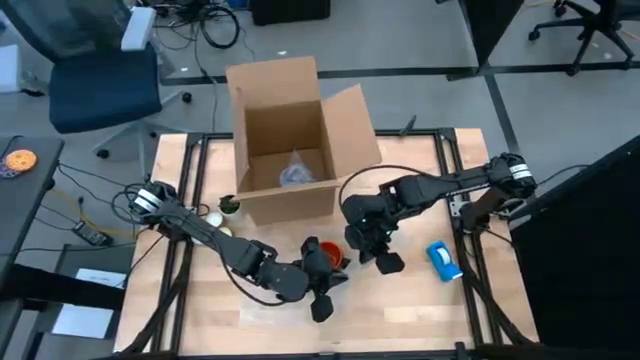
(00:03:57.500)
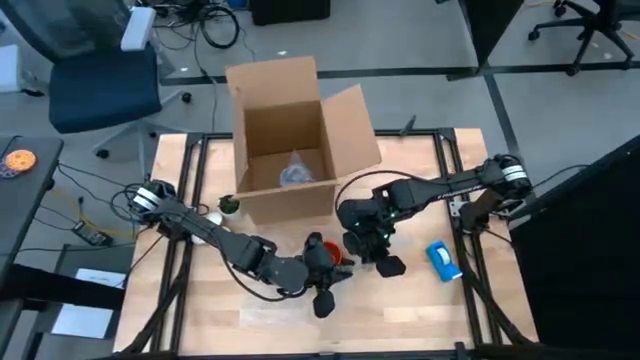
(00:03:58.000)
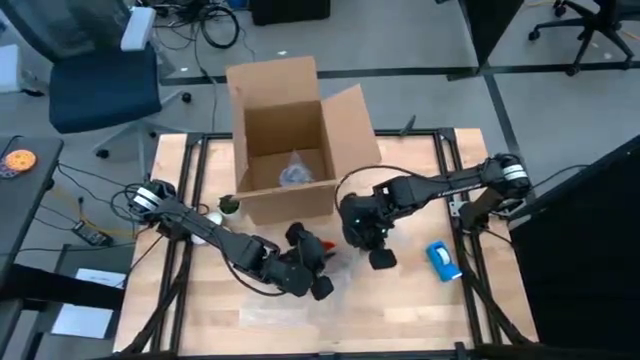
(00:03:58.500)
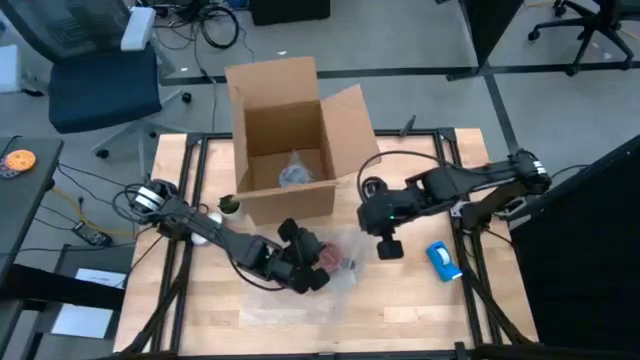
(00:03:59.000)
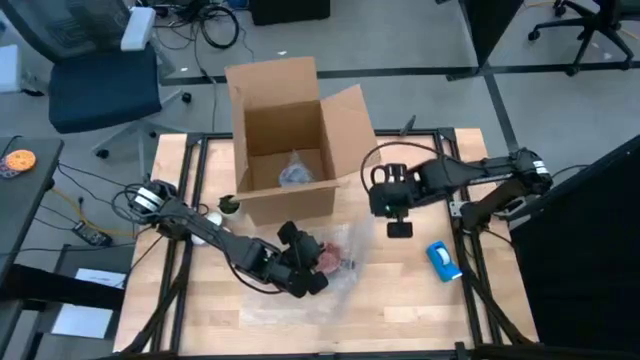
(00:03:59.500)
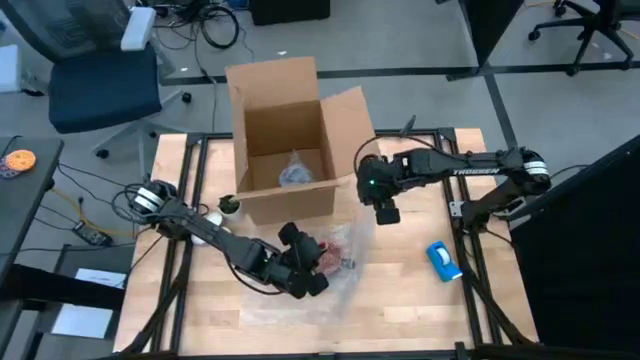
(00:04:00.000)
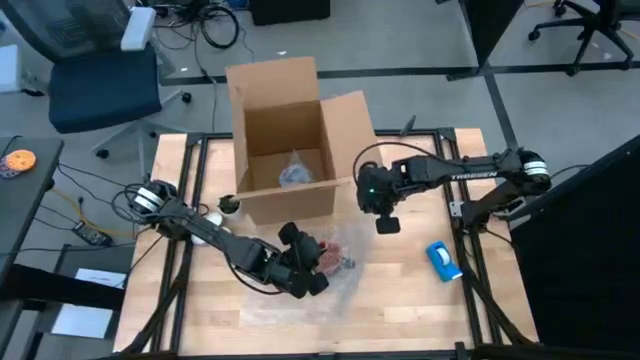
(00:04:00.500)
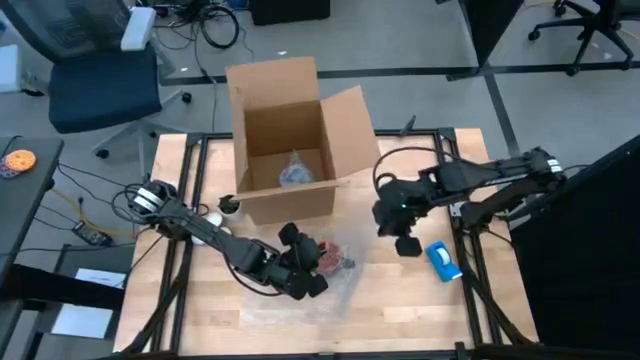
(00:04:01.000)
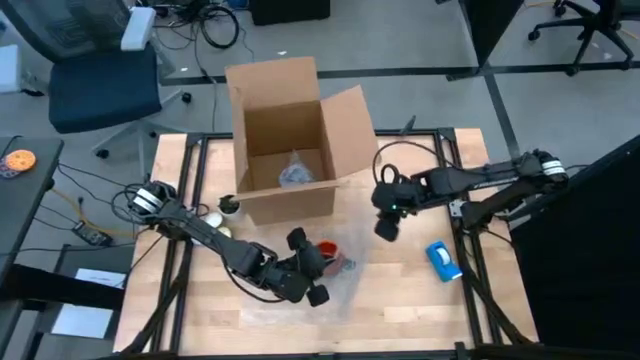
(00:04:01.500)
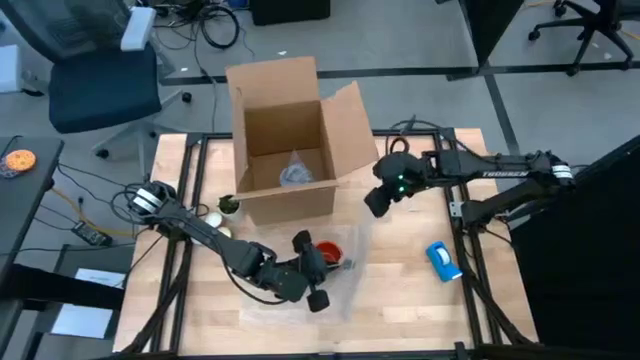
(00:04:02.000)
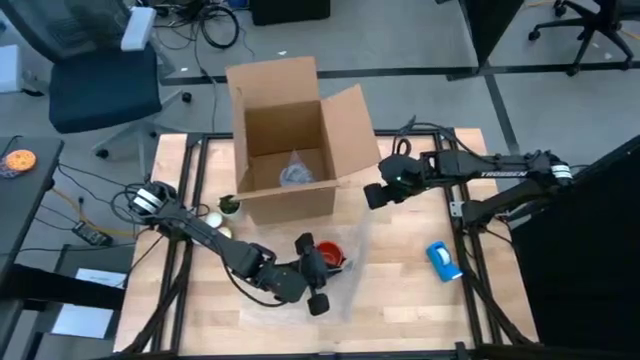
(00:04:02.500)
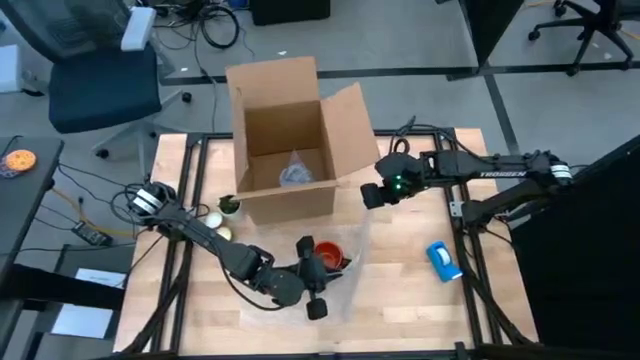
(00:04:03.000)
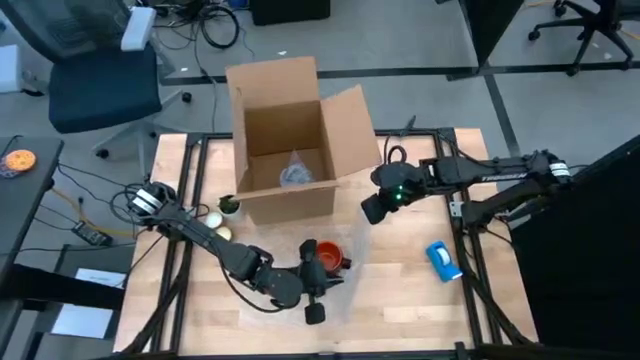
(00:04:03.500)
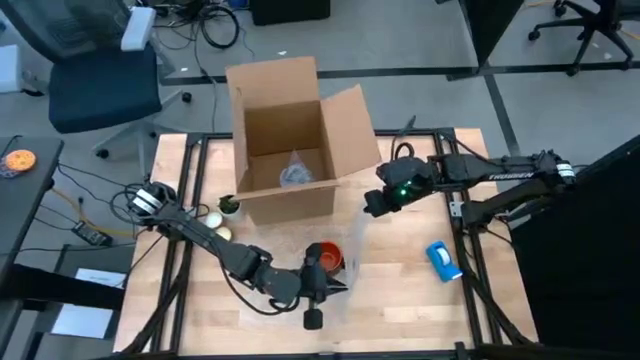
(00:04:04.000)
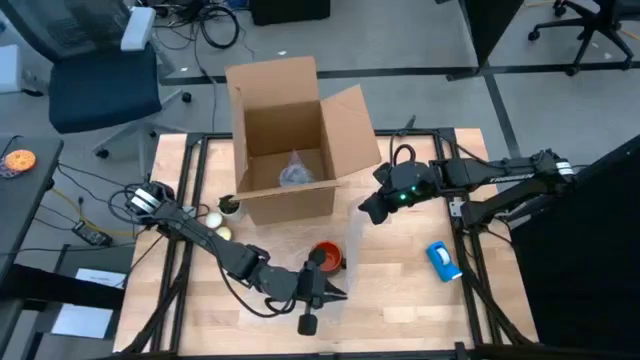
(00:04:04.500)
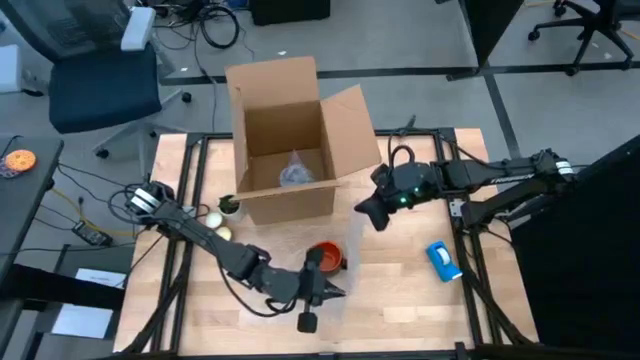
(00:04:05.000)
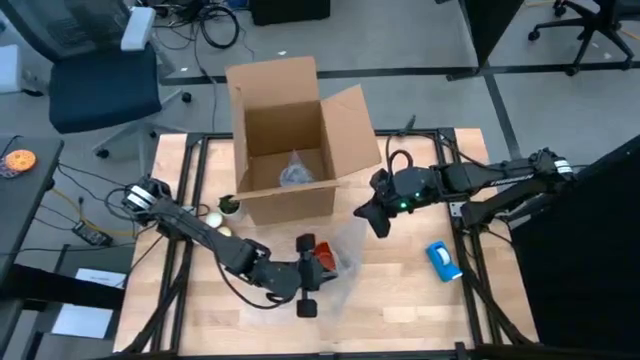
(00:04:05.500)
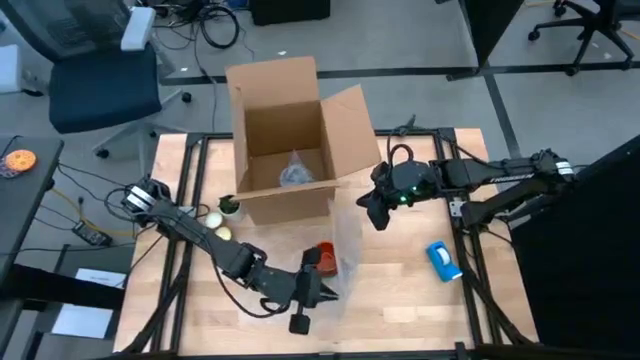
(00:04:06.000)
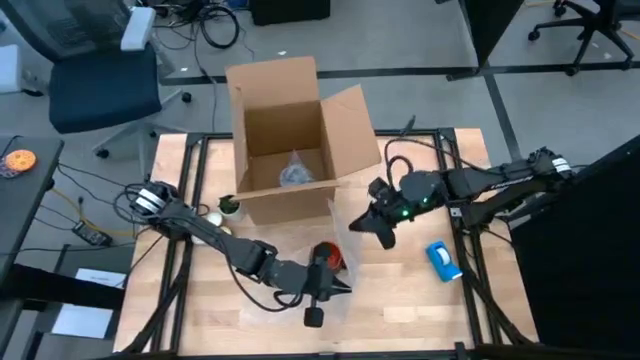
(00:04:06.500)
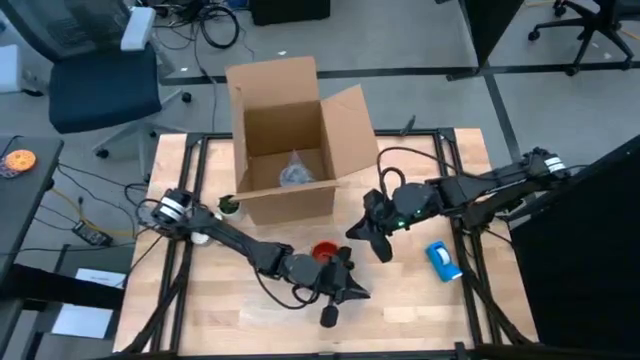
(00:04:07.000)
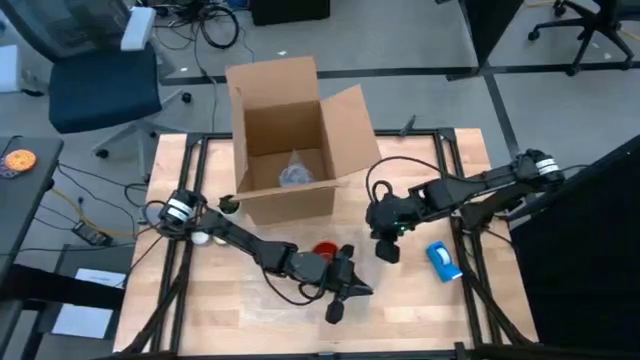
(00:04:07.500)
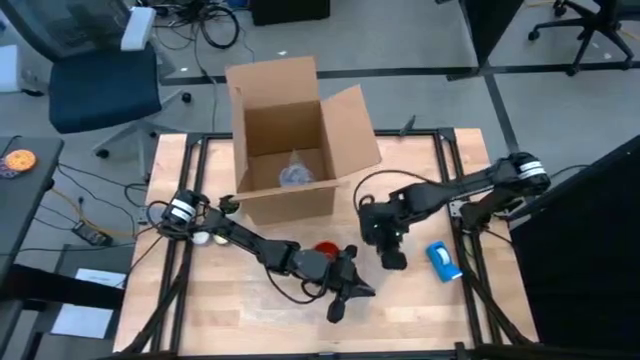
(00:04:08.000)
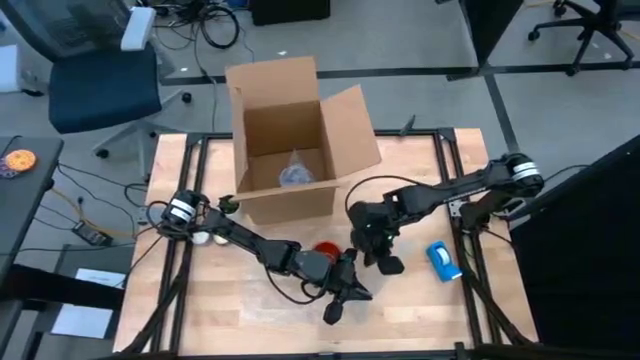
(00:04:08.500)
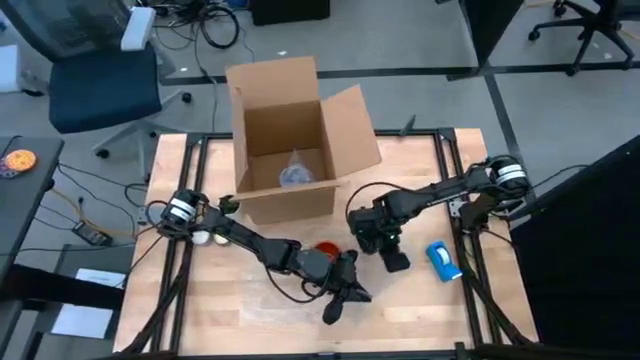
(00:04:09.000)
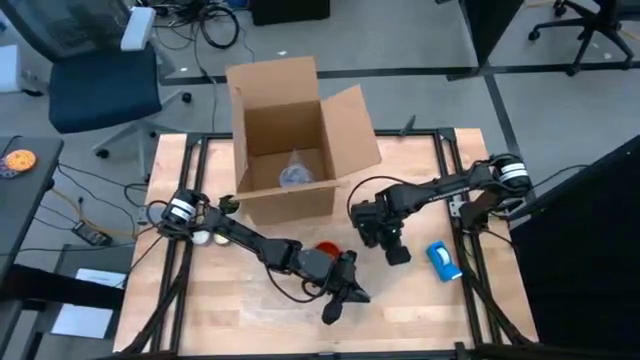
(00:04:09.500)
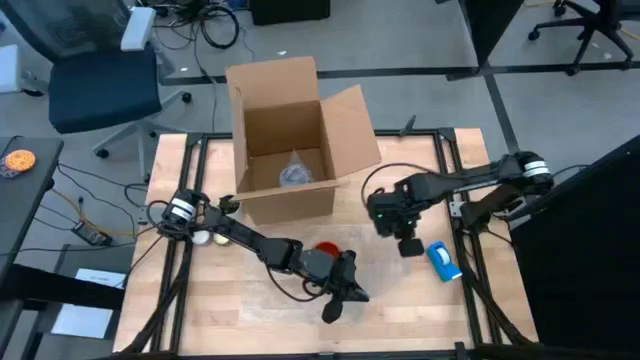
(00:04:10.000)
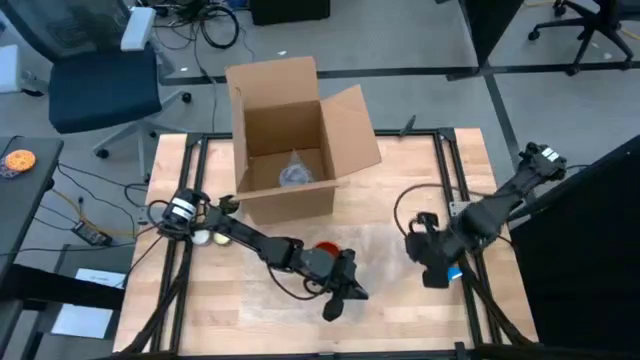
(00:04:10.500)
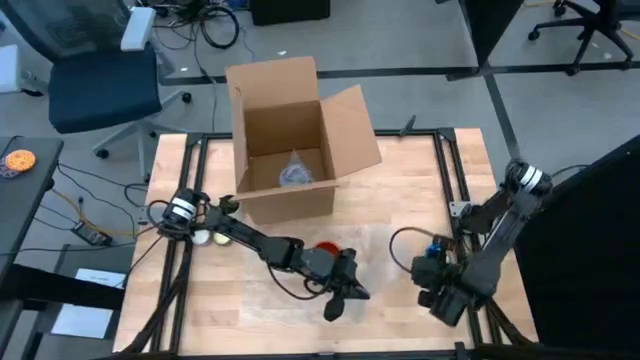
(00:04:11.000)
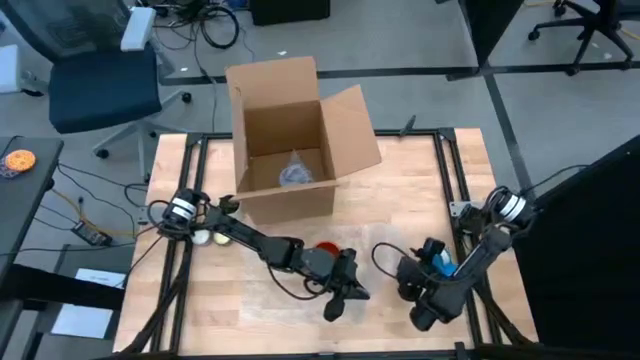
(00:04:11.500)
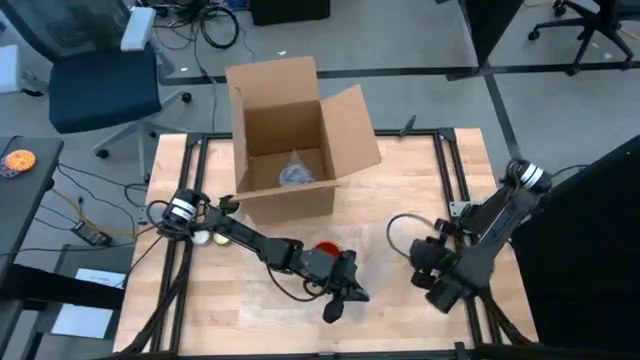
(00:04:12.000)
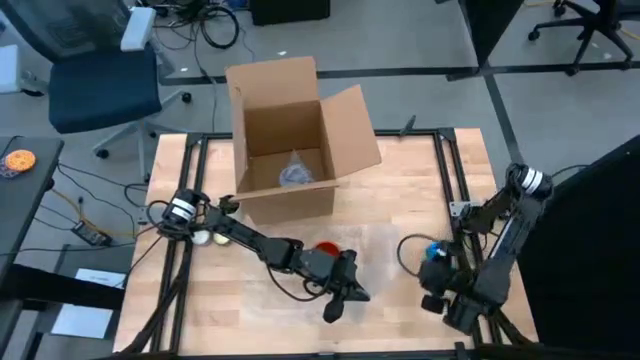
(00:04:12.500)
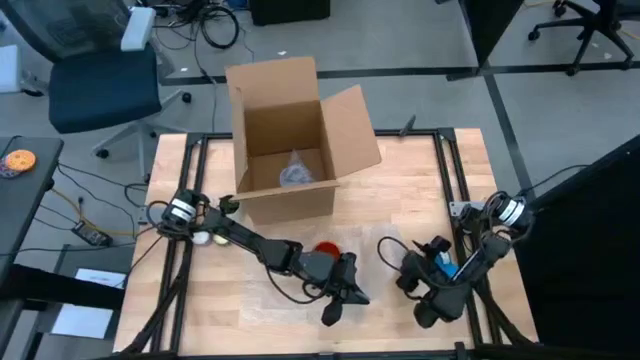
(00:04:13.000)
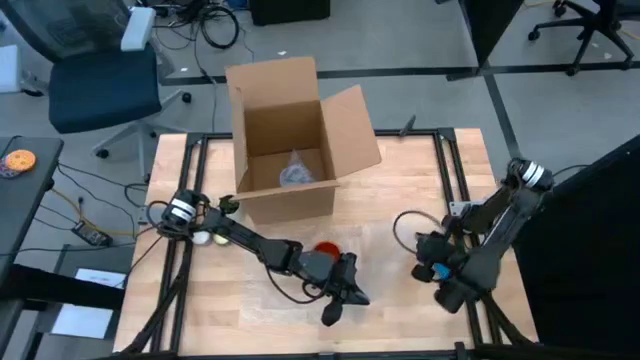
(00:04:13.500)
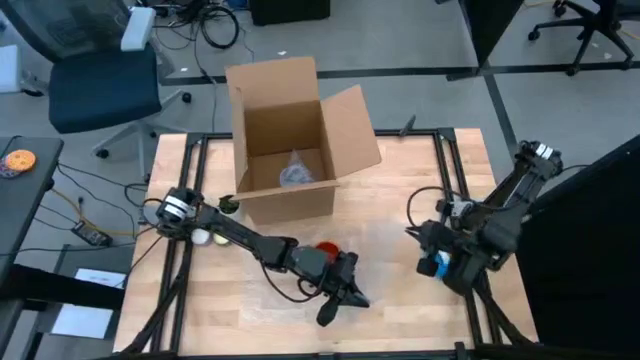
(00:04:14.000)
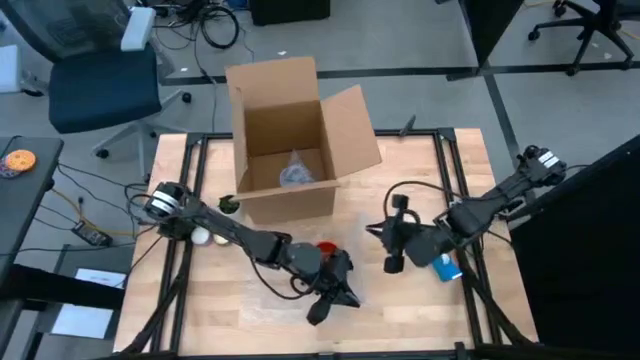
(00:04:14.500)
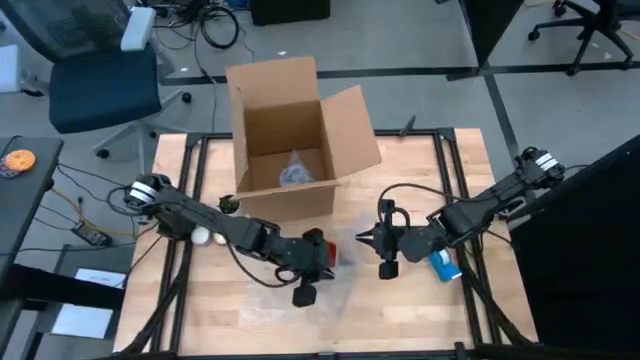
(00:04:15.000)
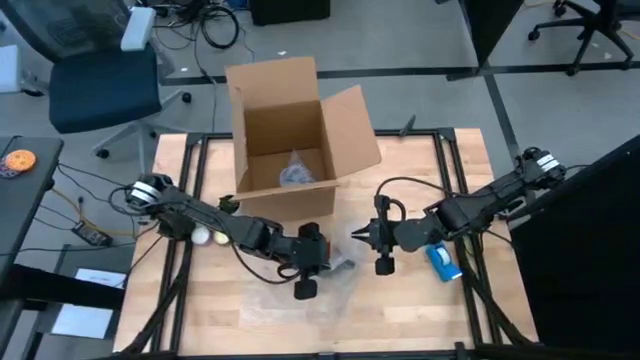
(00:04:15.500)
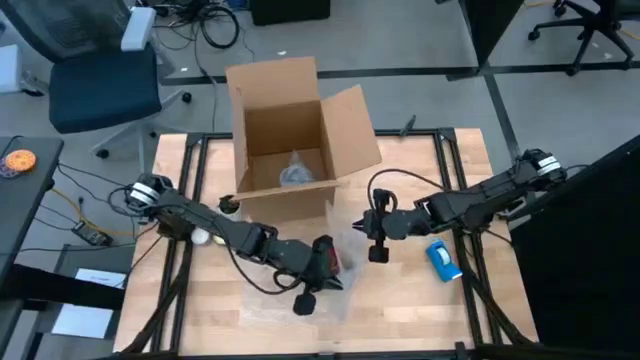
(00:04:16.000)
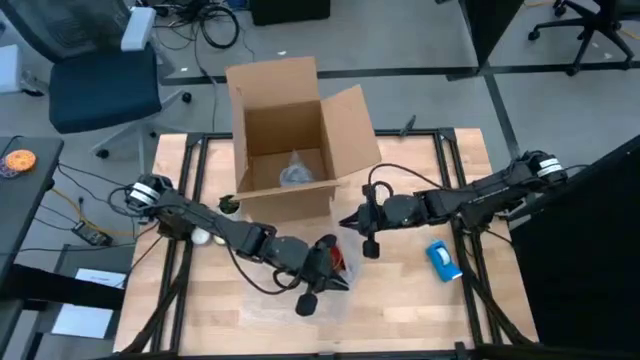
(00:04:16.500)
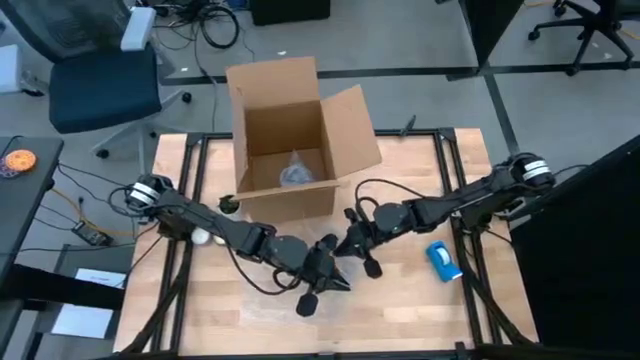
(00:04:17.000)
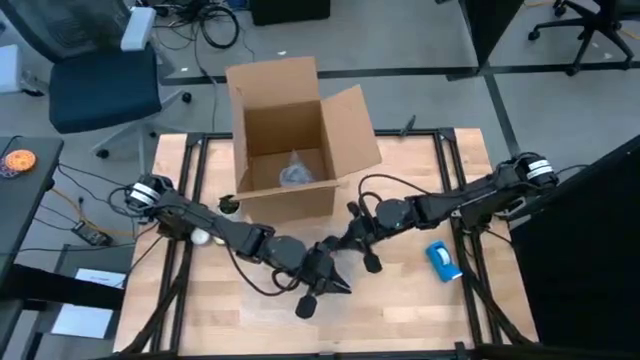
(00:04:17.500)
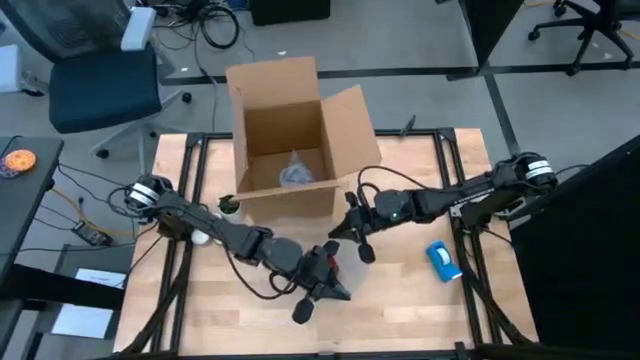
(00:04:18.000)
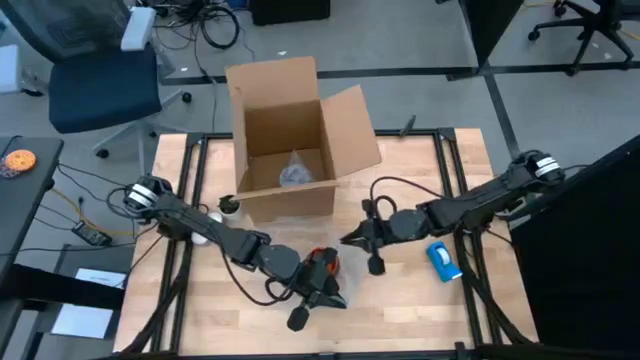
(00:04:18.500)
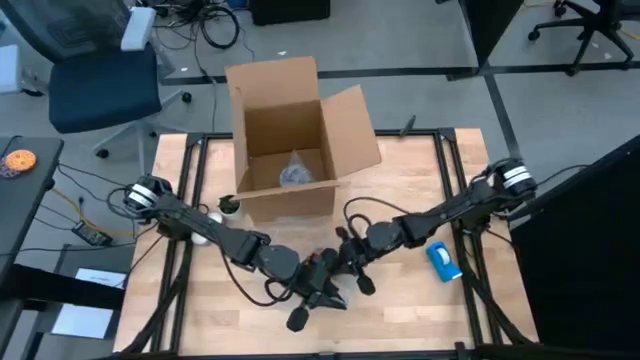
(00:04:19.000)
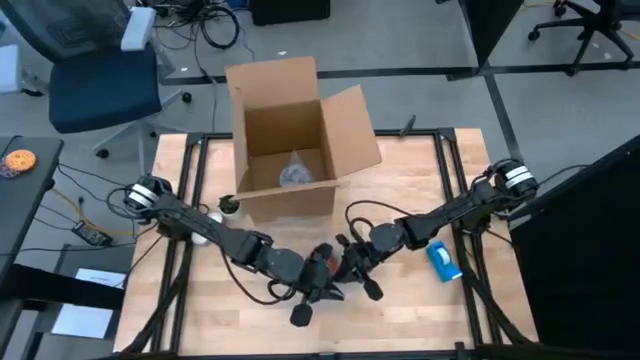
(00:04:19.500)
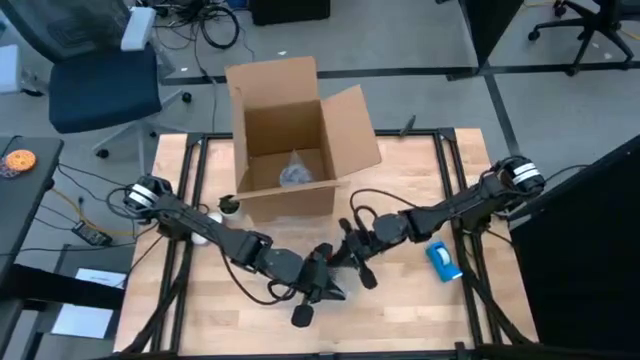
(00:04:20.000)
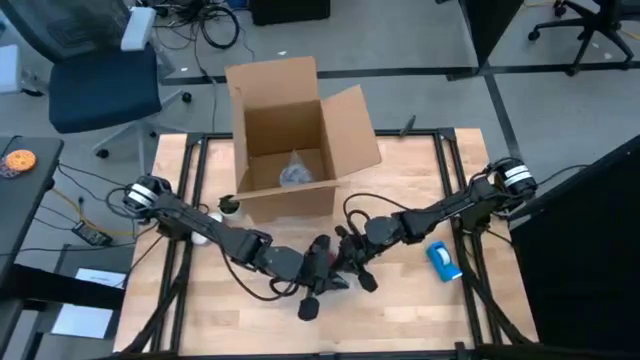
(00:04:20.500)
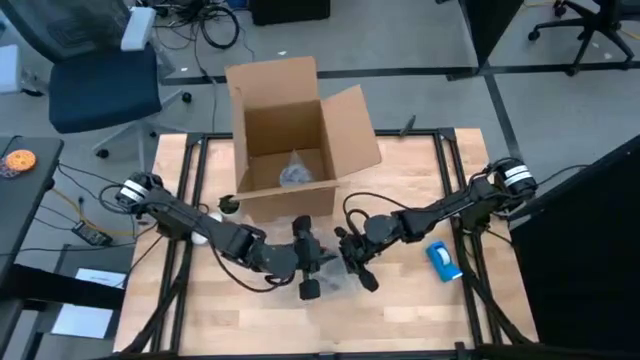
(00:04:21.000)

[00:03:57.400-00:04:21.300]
Task: wrap mug
Wrap the black mug with bubble wrap
